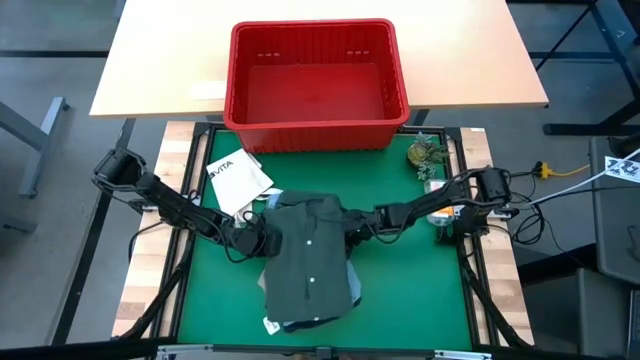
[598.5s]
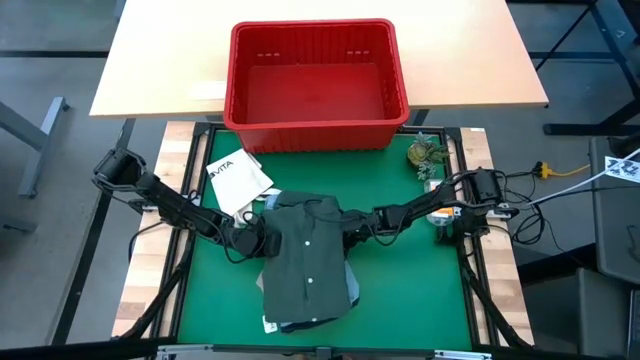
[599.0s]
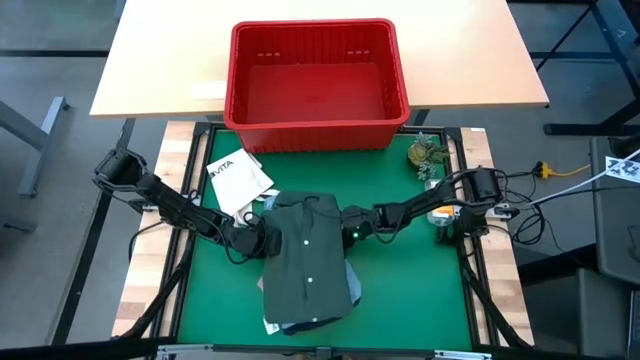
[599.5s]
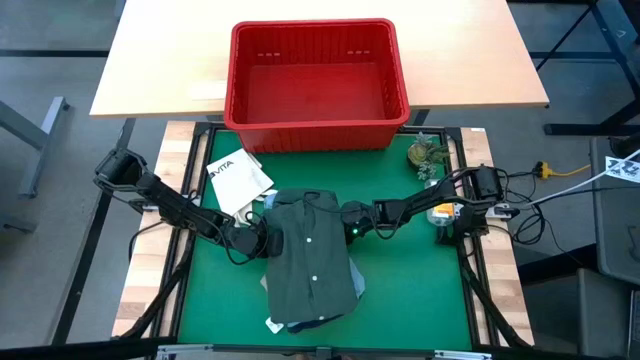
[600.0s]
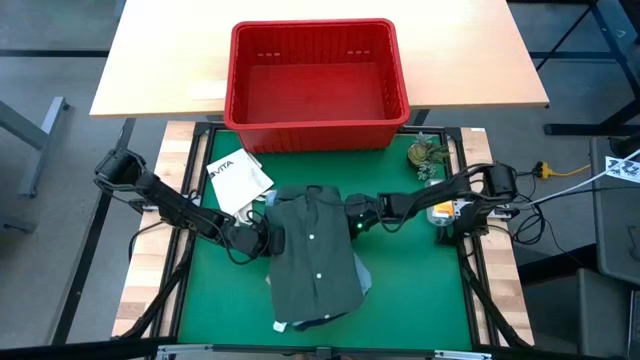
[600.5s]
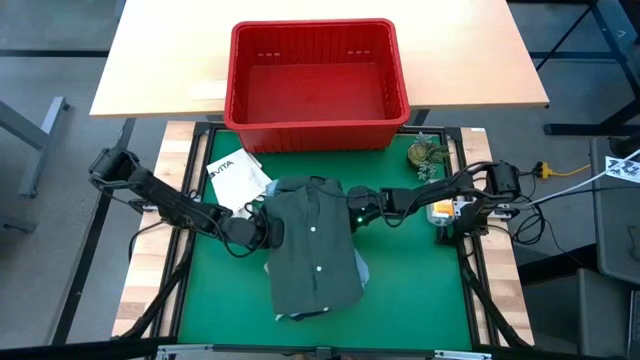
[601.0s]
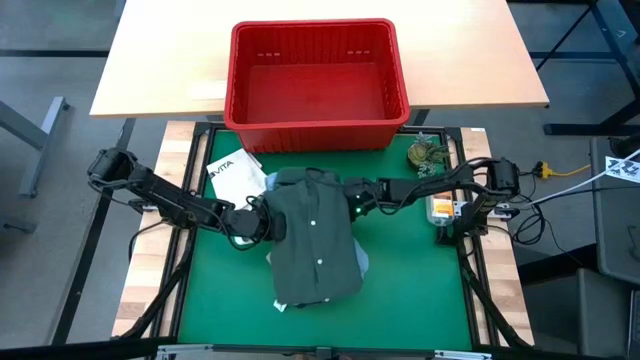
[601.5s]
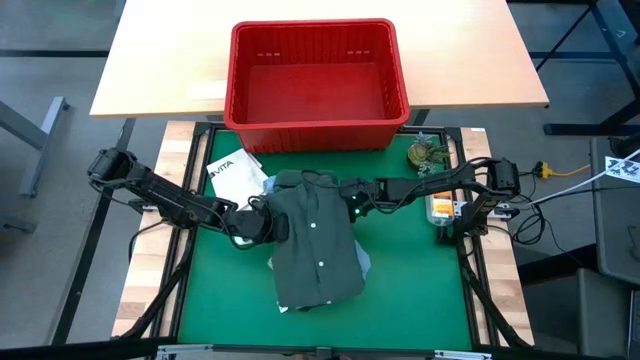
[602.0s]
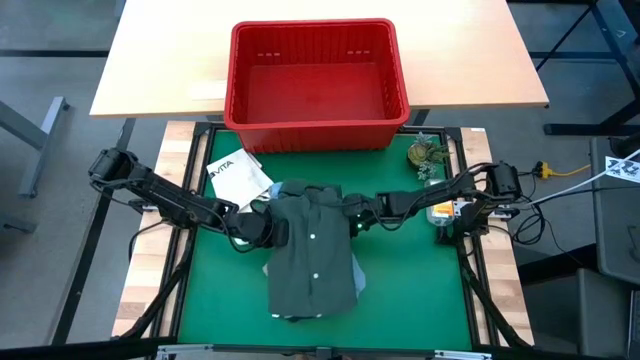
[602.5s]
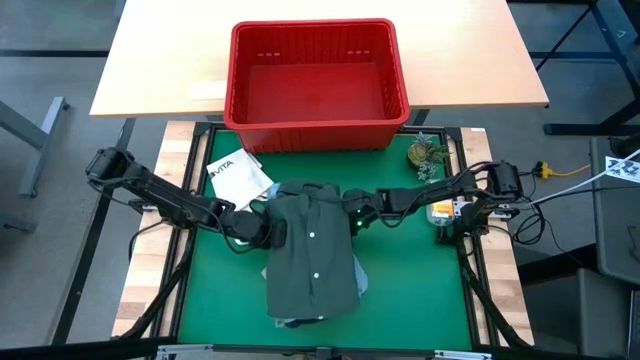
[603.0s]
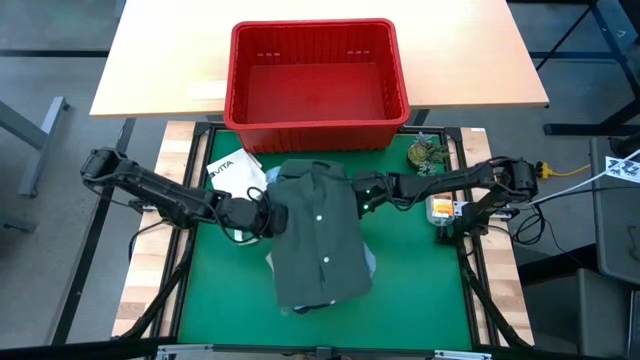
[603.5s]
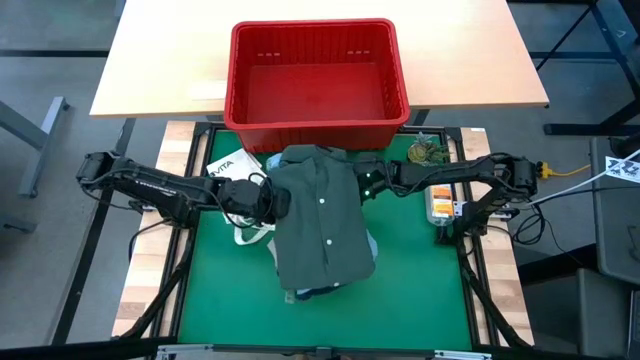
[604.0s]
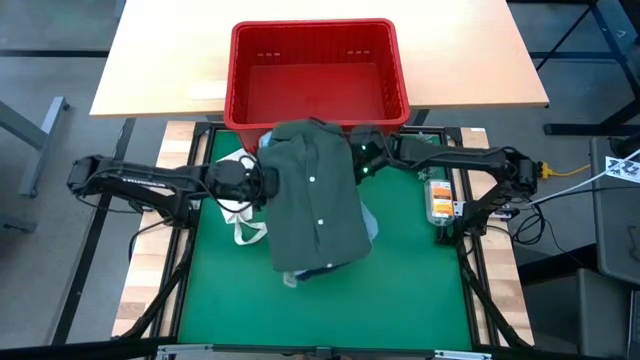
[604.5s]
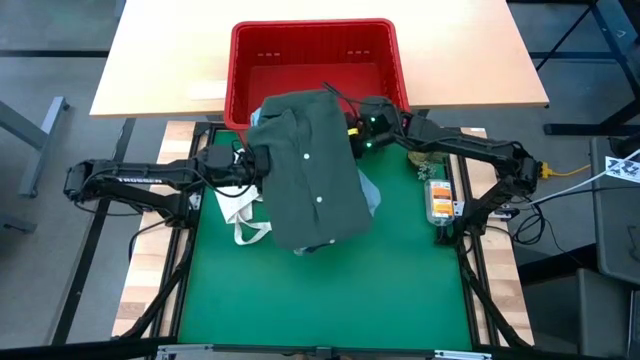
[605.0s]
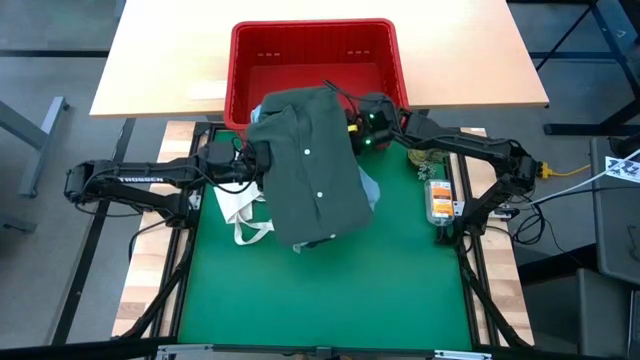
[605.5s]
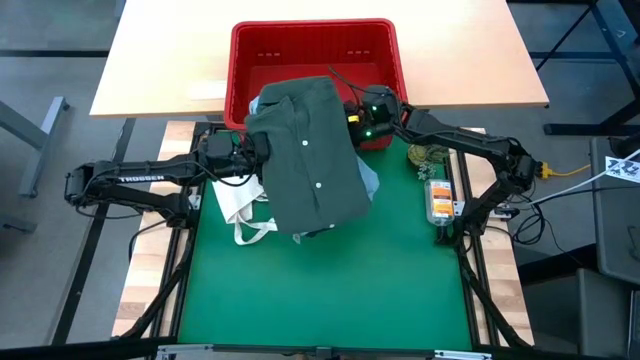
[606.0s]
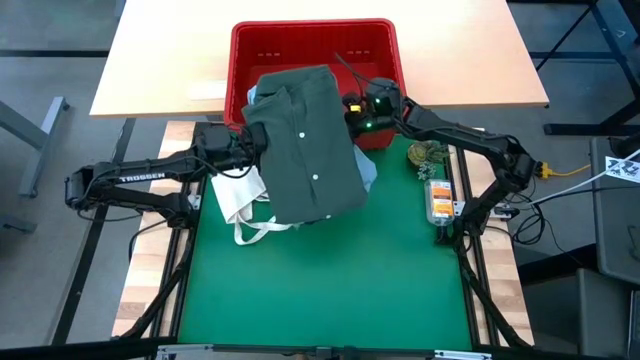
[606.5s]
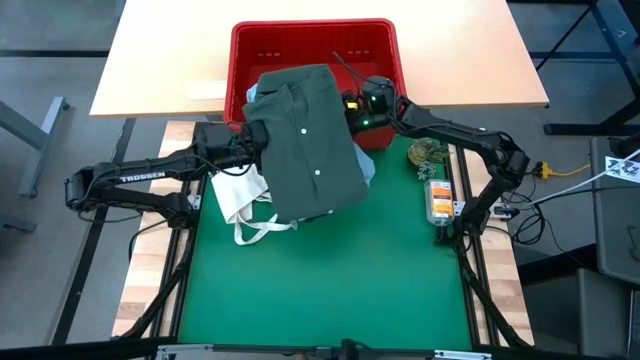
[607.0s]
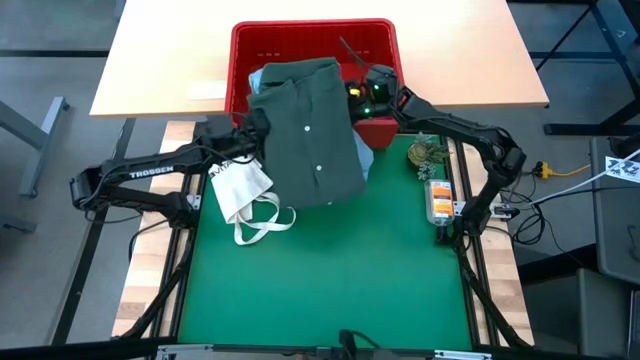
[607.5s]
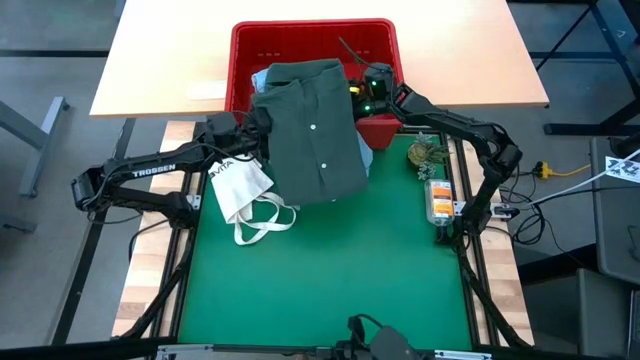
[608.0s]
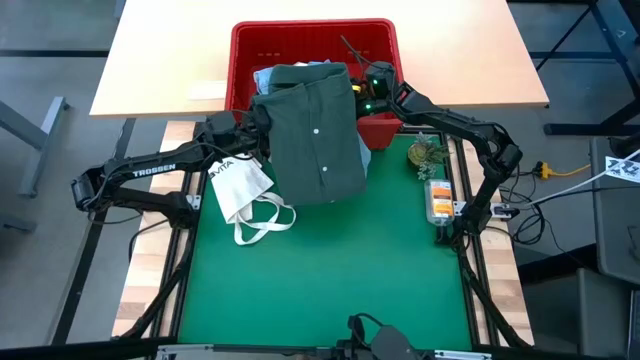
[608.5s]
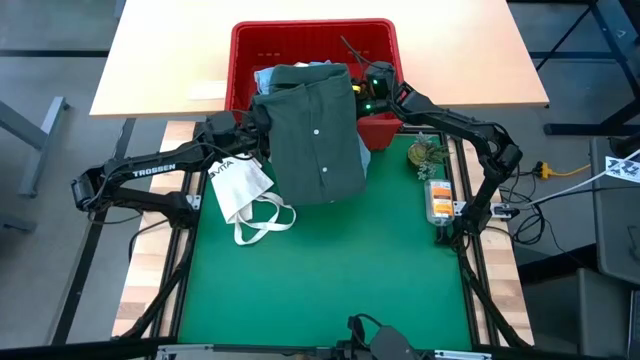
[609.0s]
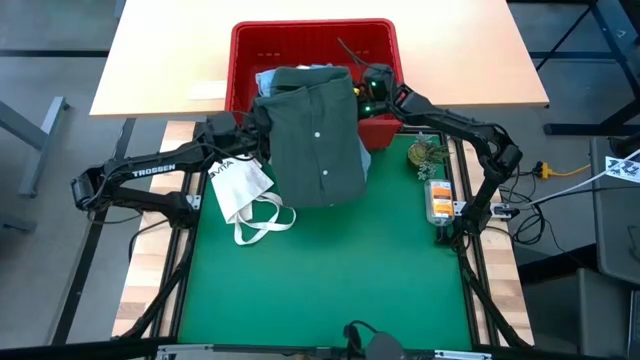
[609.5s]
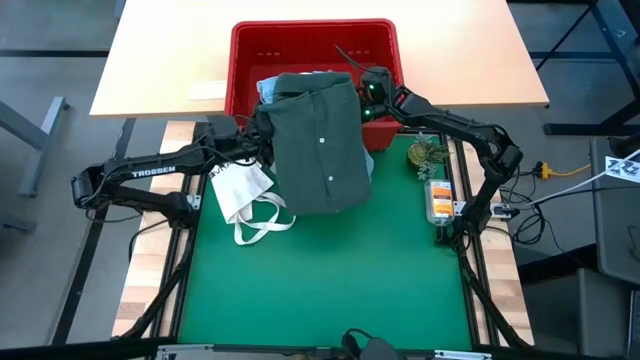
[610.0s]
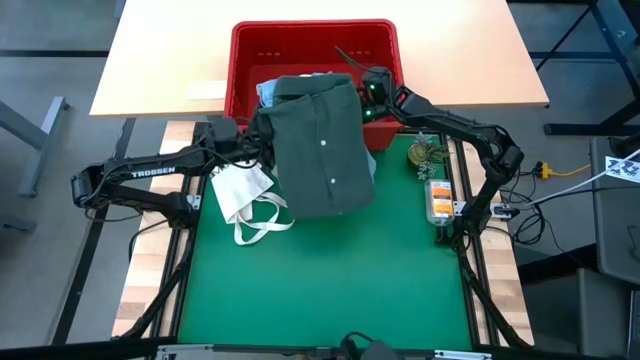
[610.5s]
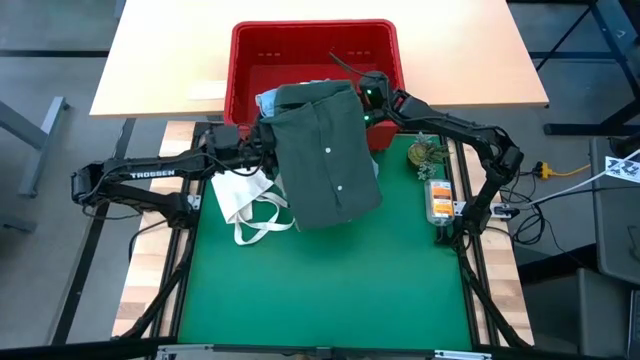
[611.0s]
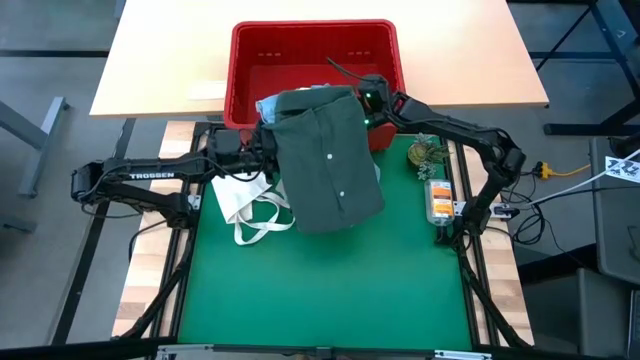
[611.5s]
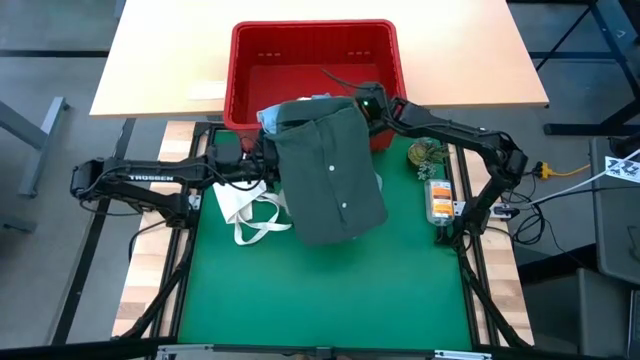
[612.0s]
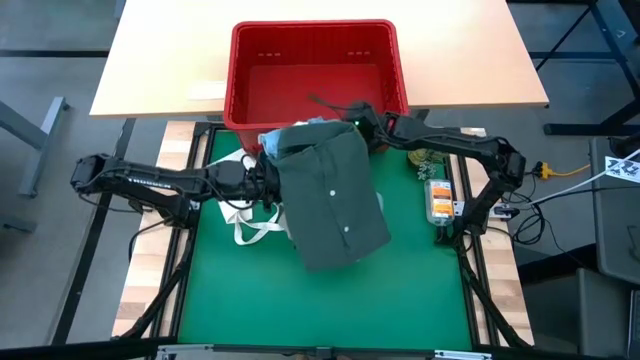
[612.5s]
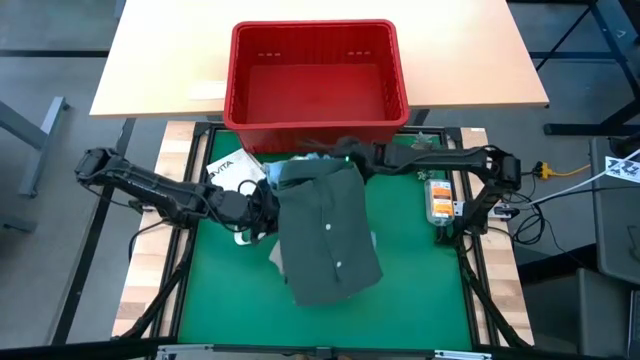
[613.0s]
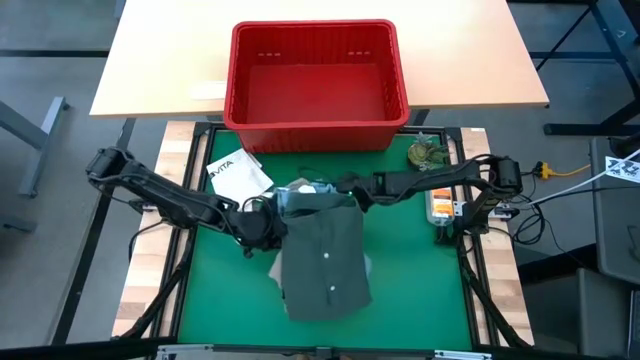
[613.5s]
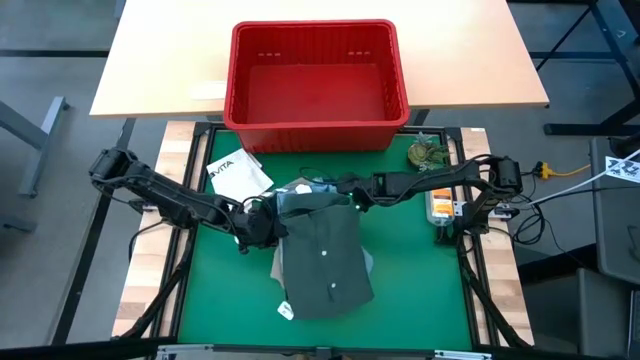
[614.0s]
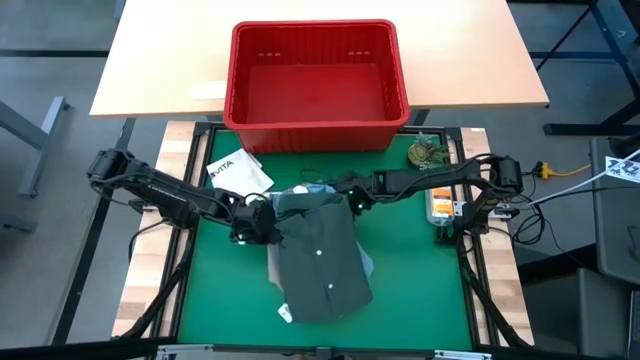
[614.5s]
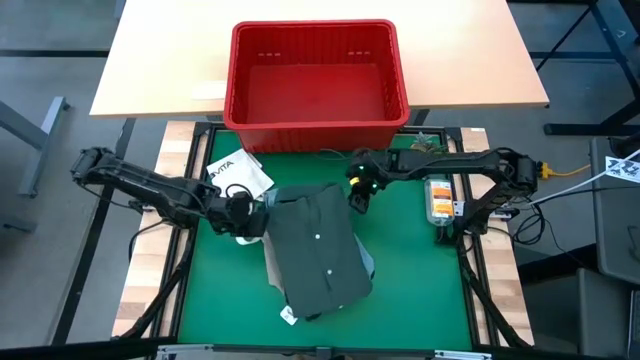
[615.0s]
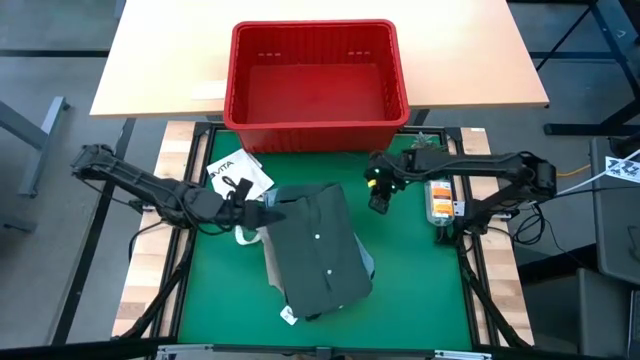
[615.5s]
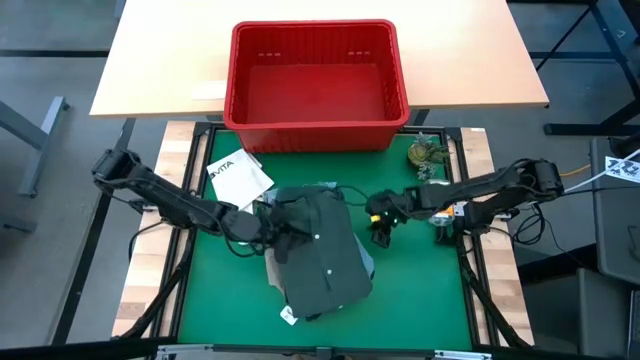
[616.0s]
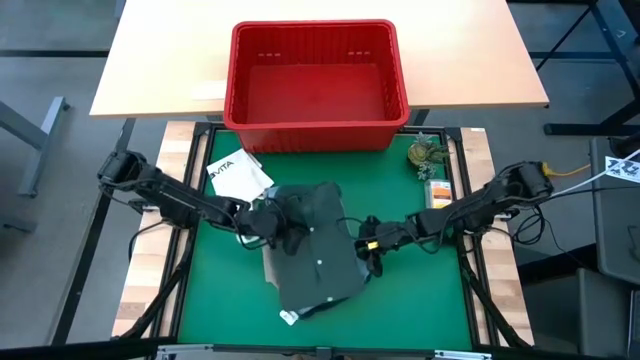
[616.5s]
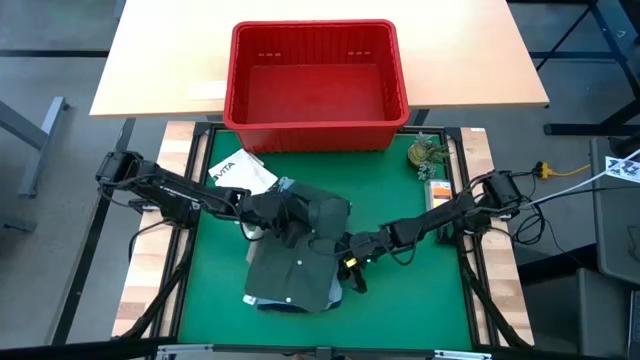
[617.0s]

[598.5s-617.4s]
Task: Fold Laundry from Bin
Put the stacked clothing into the organizer bin
